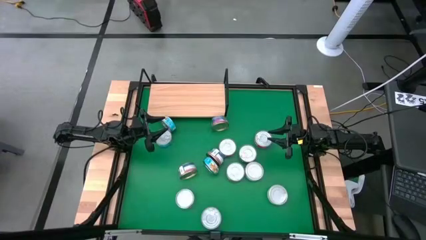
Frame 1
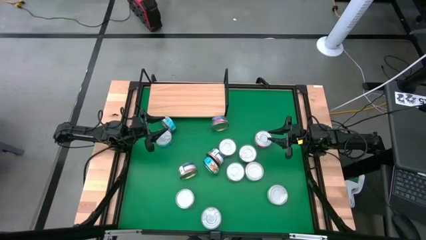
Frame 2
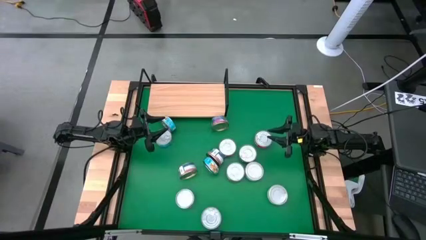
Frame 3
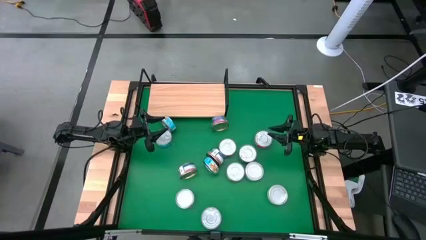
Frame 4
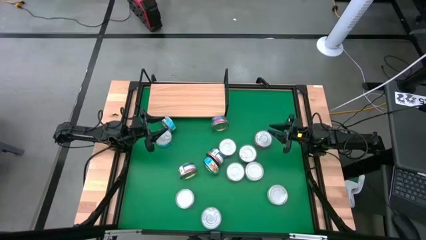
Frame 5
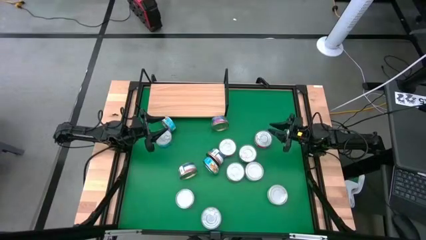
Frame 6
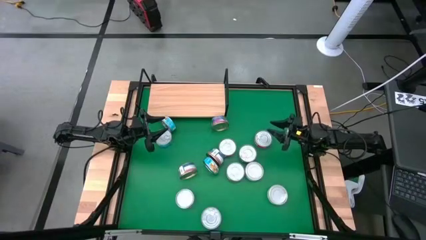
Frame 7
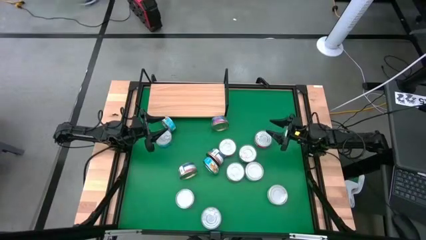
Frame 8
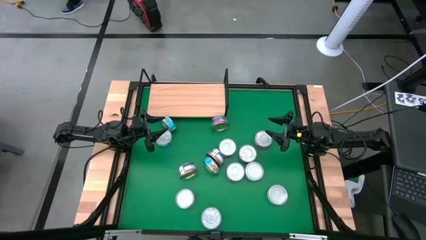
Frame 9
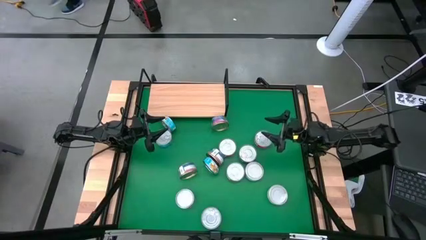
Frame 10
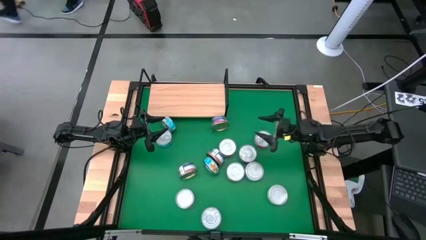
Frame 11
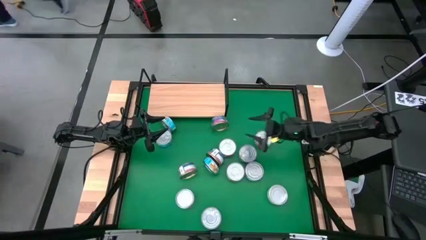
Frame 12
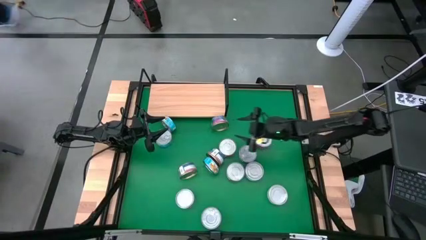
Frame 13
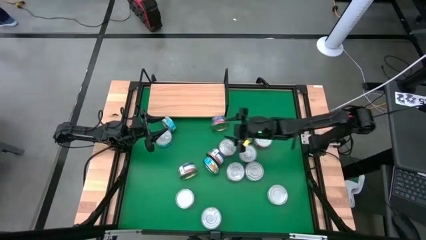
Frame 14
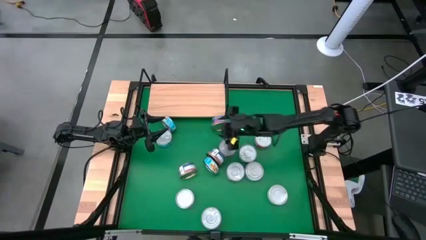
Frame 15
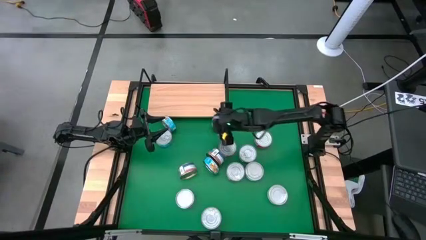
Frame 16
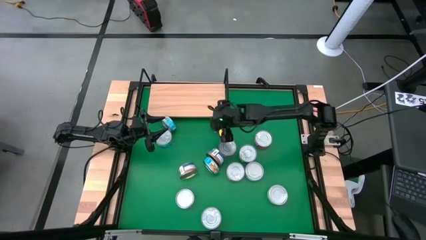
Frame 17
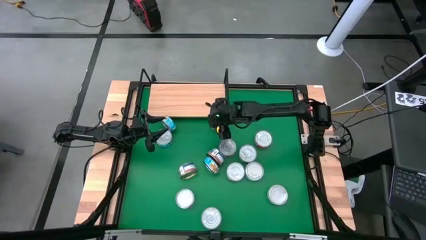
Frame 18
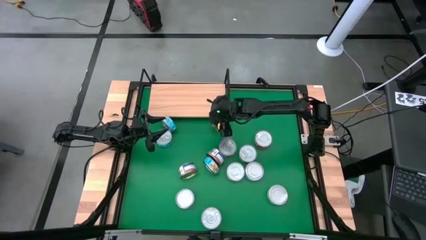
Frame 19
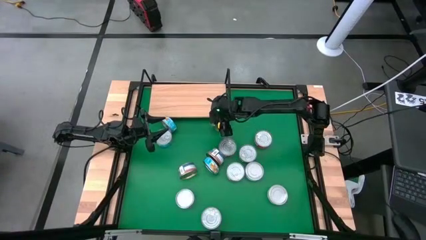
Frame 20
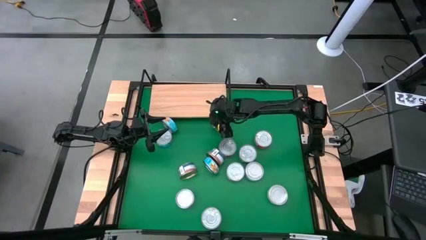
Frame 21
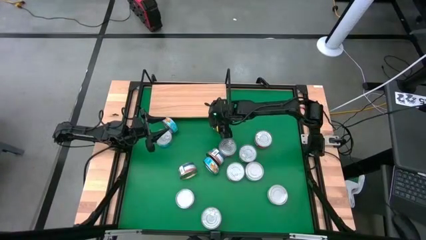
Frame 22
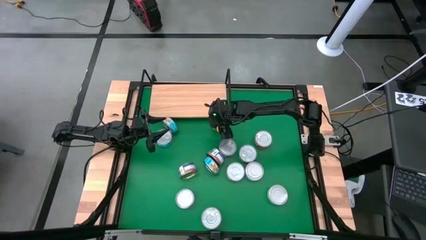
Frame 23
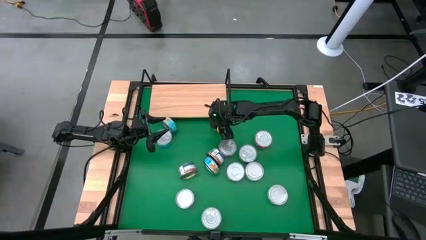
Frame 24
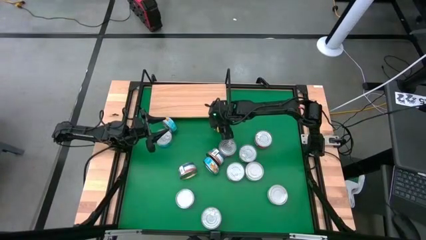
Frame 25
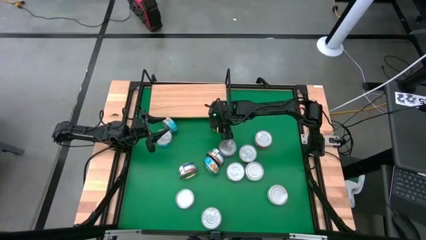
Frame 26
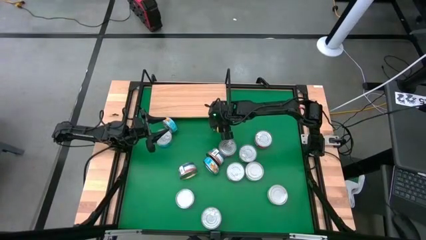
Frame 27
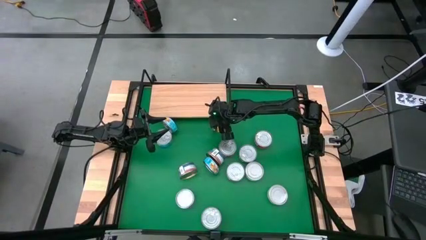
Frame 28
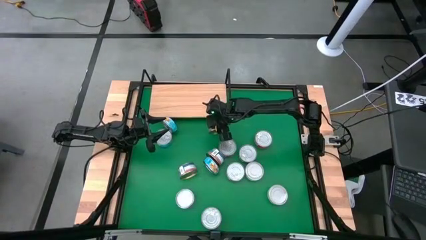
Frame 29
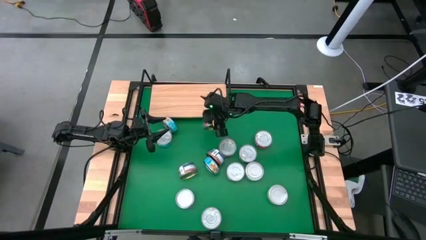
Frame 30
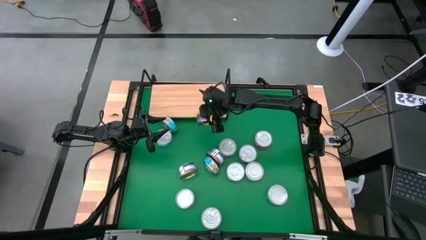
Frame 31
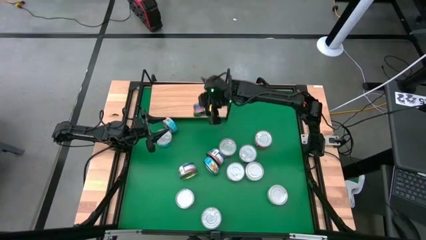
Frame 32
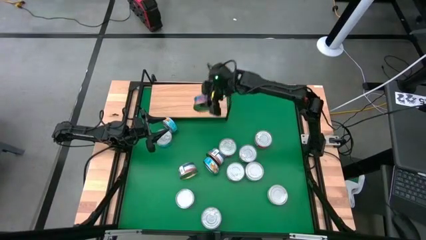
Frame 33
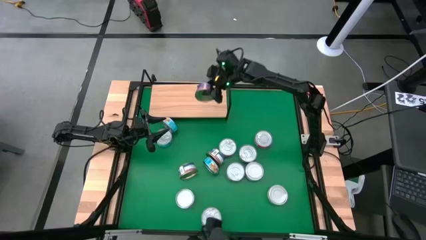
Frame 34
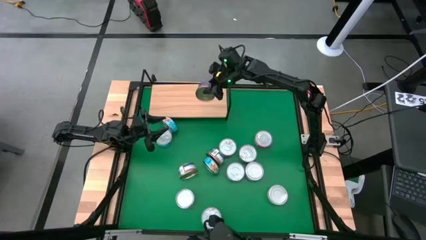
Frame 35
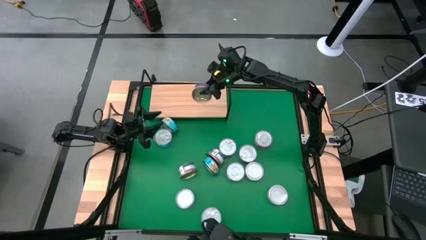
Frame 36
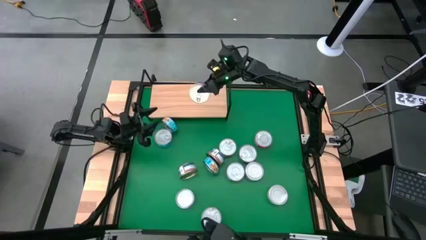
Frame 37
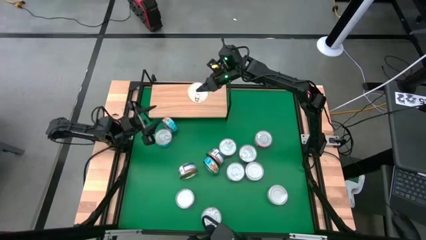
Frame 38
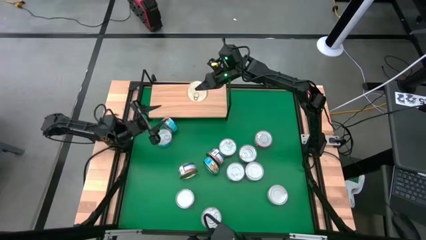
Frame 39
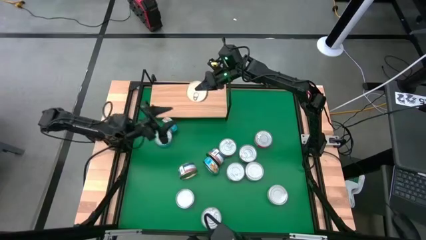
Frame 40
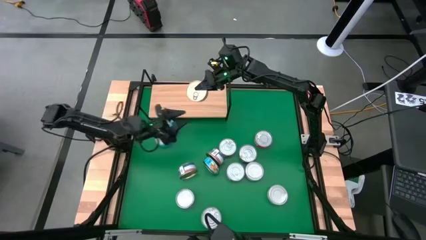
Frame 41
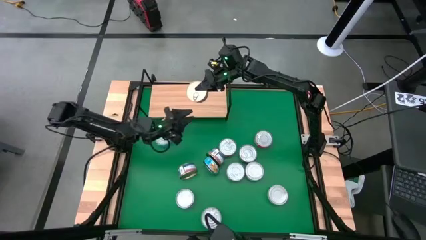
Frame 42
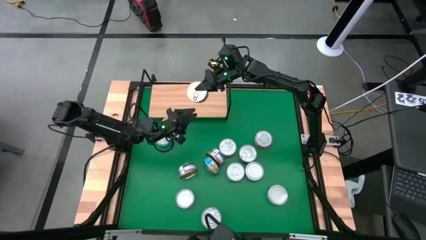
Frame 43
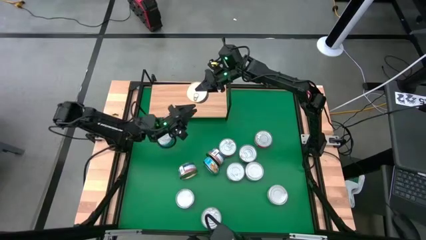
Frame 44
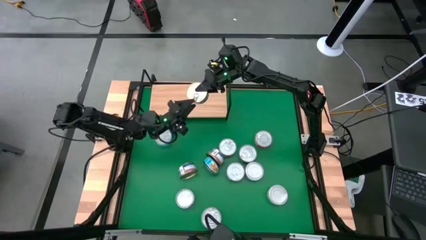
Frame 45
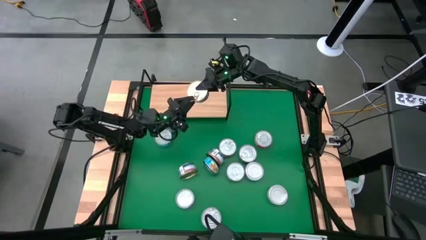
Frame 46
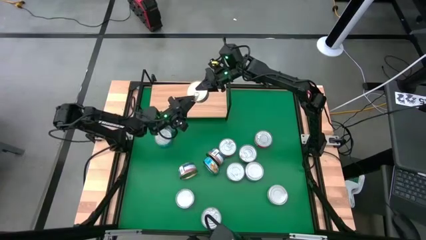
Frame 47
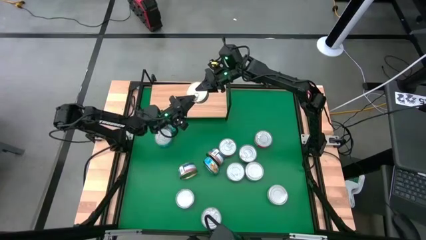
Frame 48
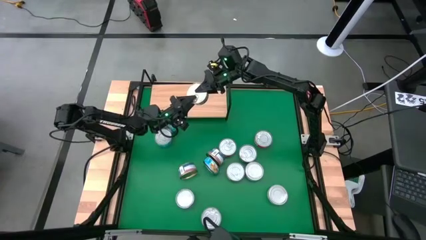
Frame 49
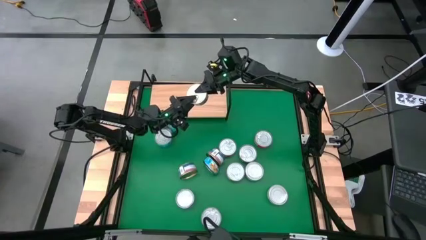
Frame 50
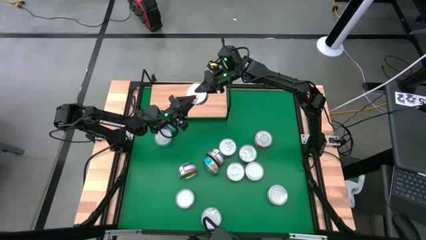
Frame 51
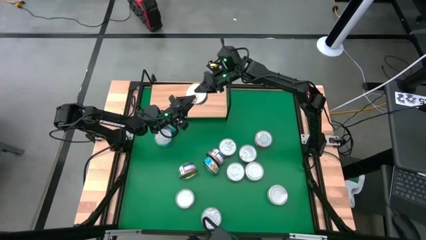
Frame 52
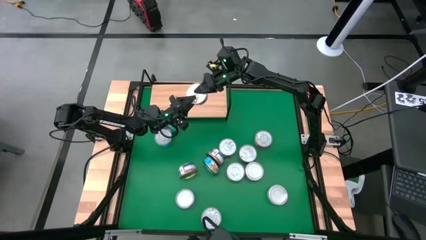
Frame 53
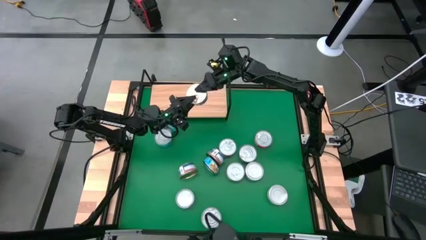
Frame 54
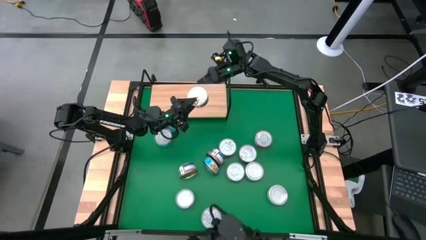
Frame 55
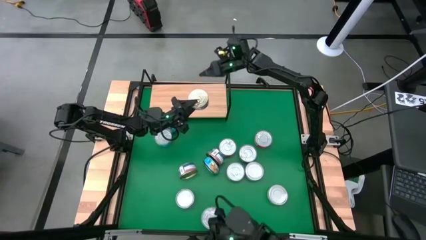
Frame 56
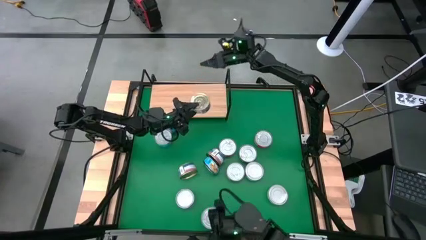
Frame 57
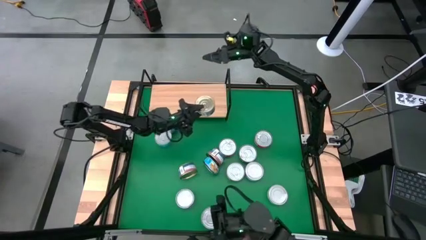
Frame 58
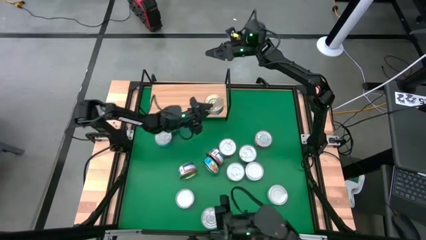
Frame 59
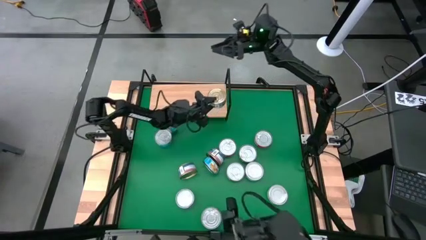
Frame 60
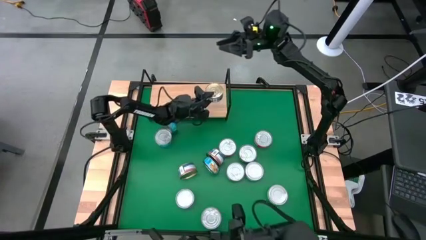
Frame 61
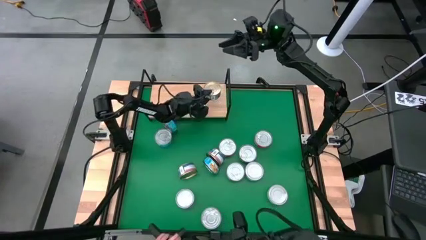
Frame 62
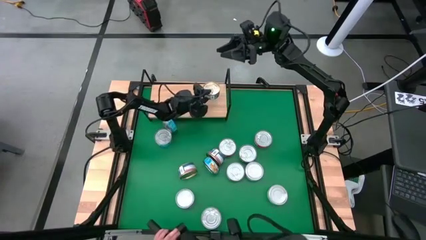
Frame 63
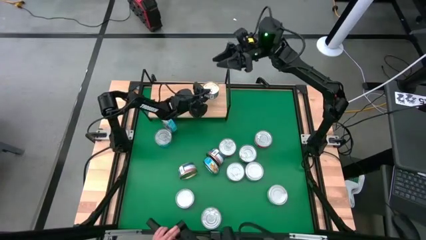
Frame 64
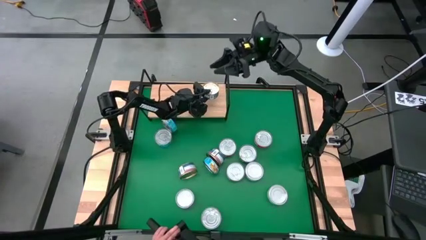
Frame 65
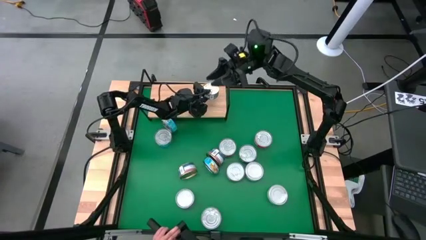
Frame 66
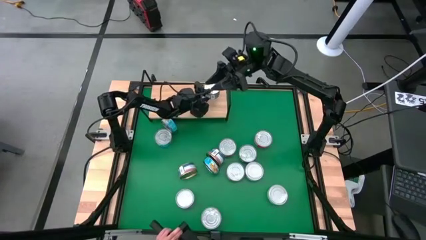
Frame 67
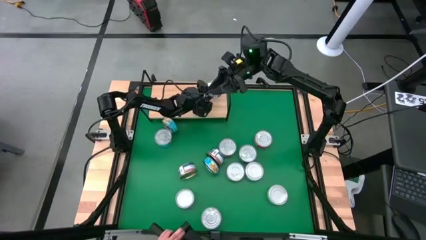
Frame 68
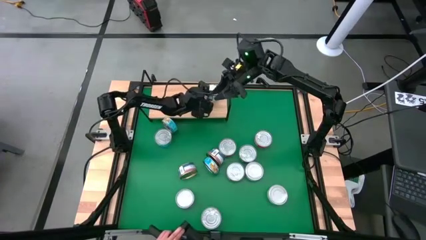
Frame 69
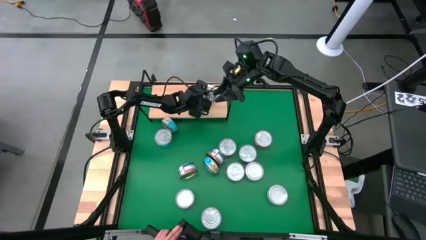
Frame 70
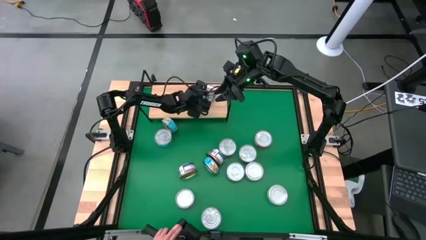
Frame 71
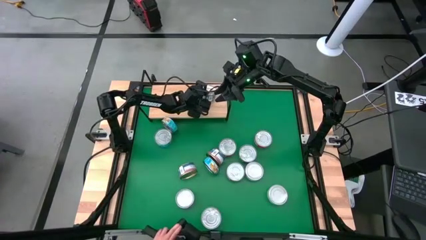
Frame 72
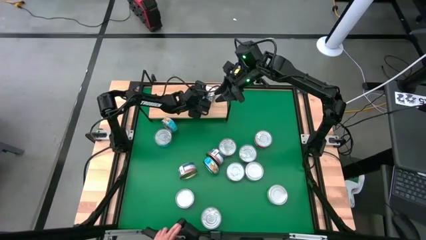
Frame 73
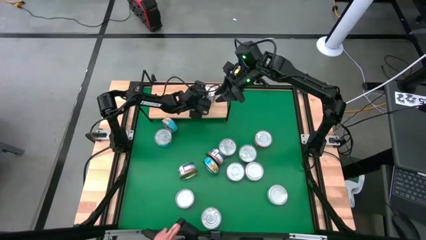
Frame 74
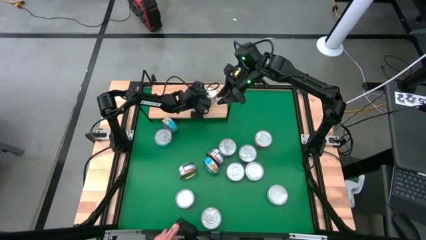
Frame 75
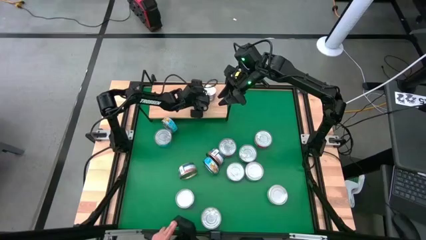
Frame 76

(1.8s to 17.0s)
Task: Stack canned seafood by type on shelf
Put the blue pink tuna can on the shelf
